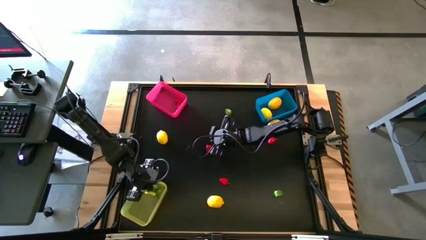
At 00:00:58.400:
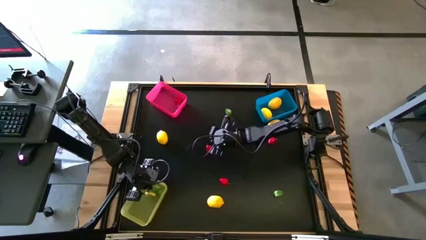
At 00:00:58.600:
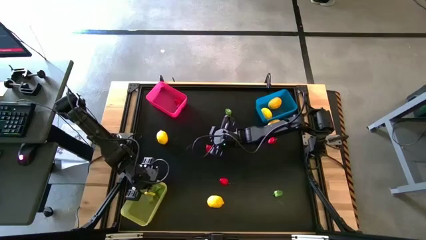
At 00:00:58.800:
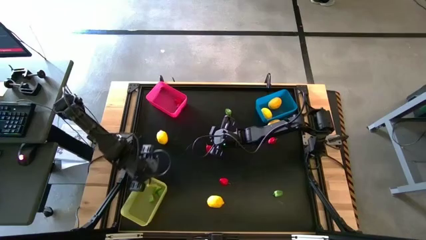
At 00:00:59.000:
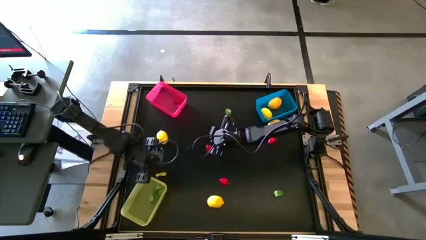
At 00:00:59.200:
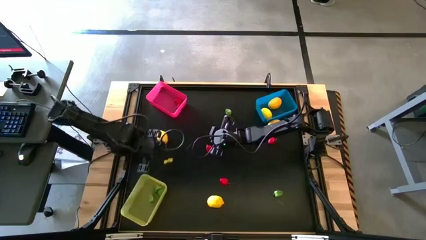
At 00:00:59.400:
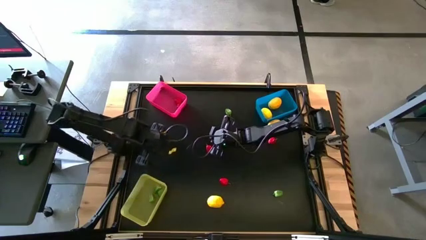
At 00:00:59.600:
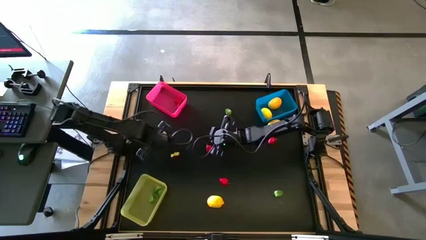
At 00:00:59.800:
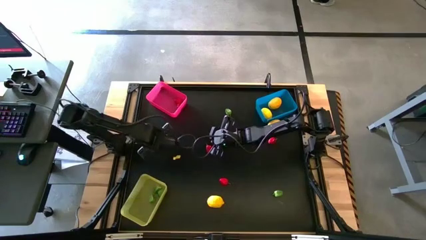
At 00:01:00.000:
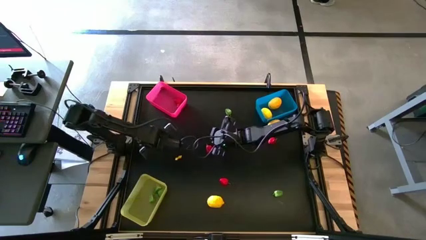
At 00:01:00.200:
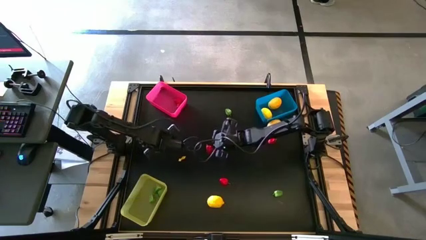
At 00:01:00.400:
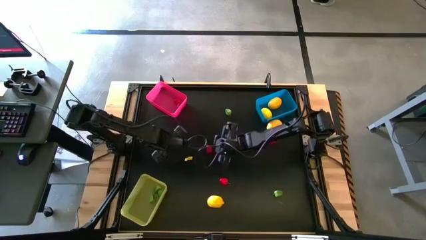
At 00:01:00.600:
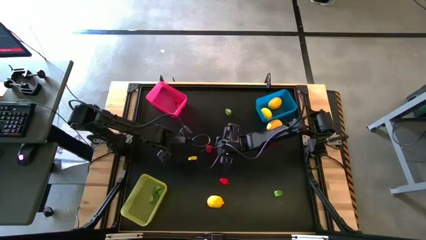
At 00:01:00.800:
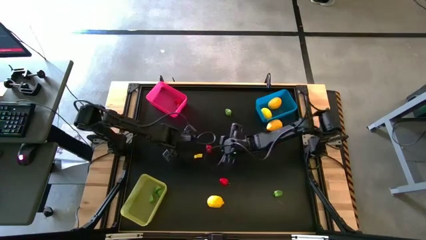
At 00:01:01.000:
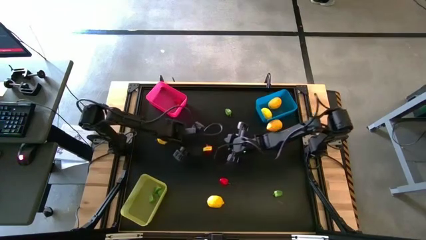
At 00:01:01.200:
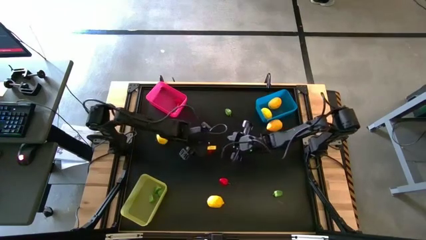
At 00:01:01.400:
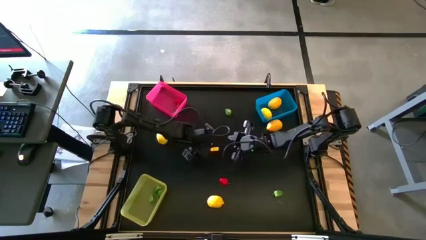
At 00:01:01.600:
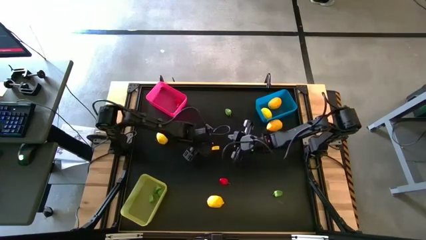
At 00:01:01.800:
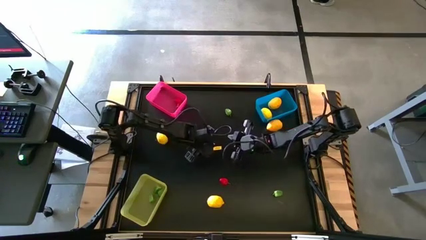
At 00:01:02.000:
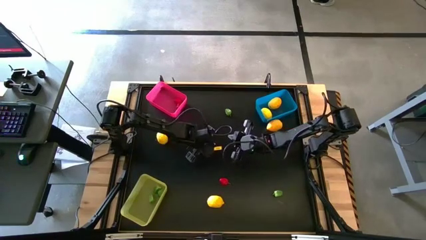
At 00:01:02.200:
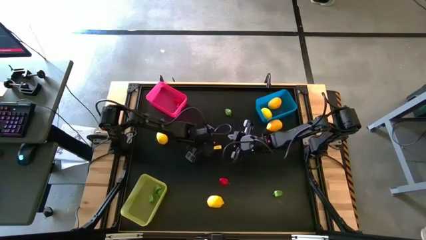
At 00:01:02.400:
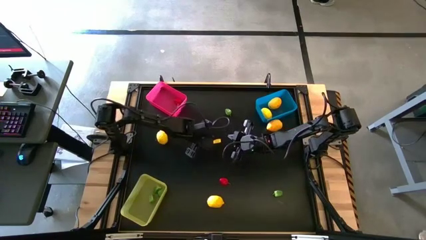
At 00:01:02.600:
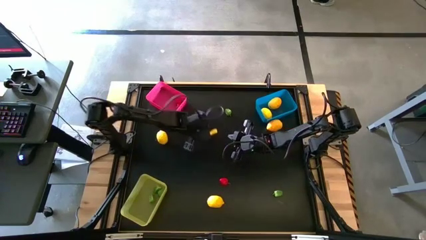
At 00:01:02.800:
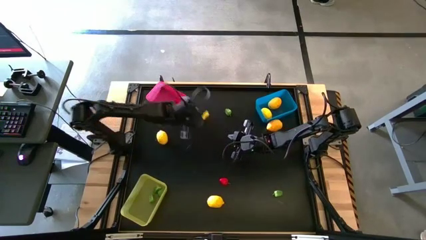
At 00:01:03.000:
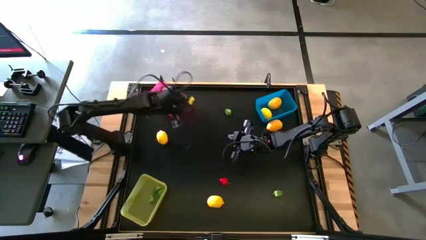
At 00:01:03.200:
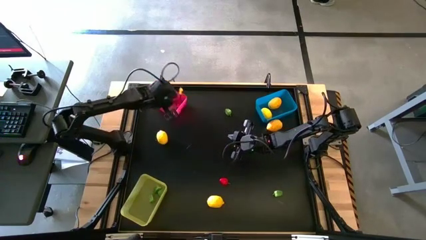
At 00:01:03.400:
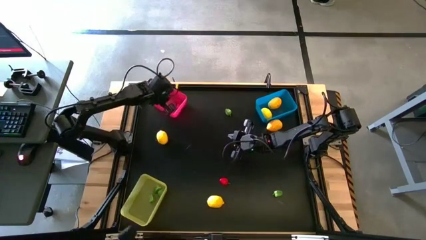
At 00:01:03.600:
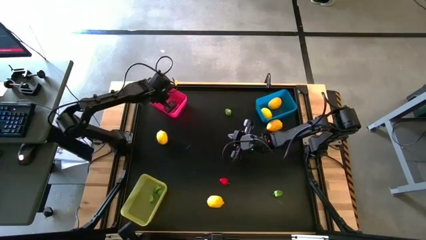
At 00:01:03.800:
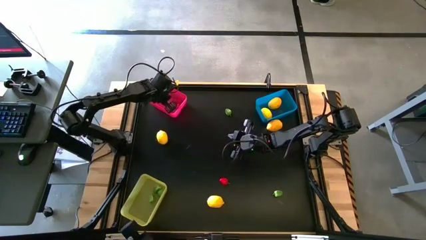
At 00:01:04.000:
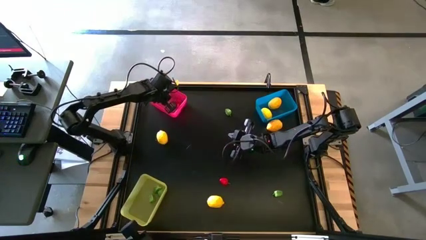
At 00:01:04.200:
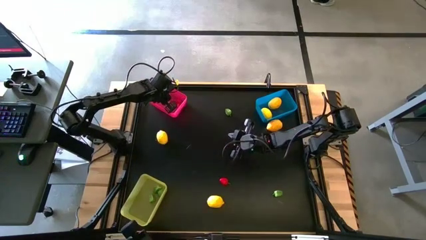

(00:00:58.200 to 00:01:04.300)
Task: Sort produce into baskets
Put the red bell pepper into the red bin

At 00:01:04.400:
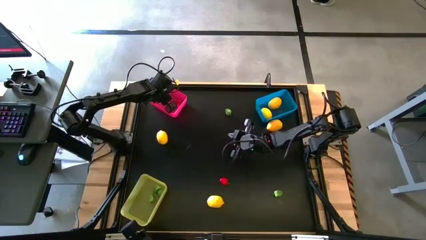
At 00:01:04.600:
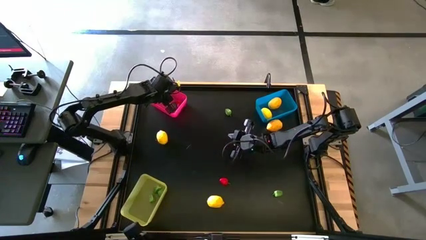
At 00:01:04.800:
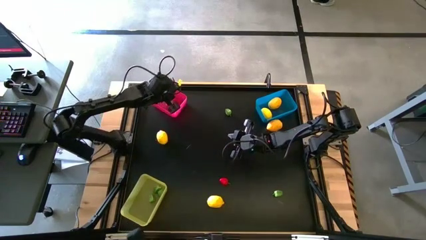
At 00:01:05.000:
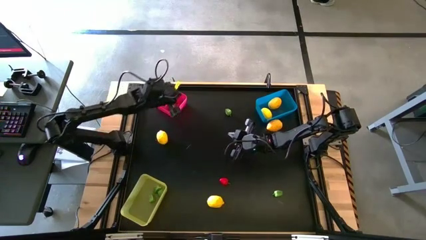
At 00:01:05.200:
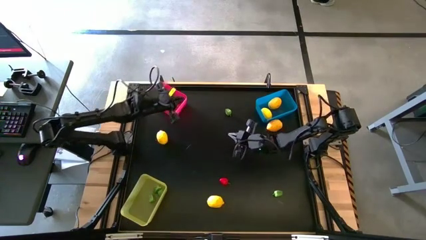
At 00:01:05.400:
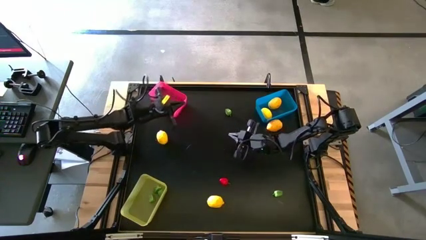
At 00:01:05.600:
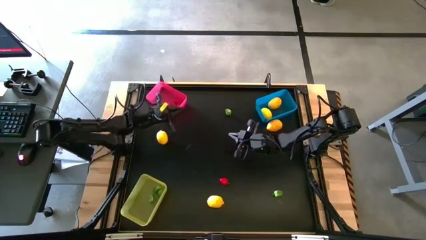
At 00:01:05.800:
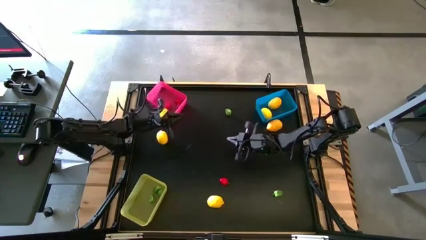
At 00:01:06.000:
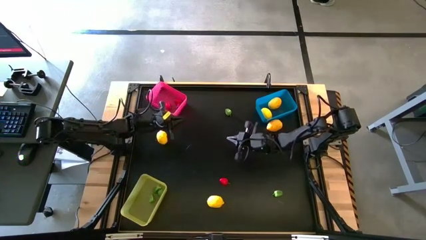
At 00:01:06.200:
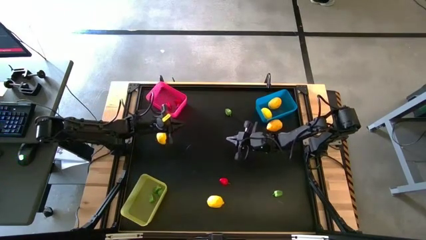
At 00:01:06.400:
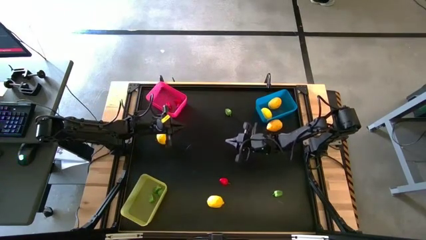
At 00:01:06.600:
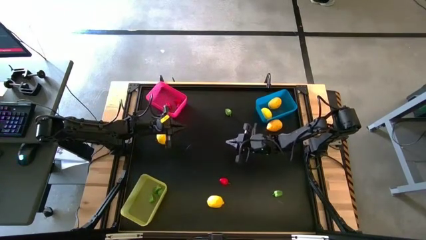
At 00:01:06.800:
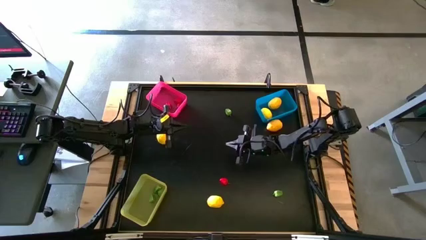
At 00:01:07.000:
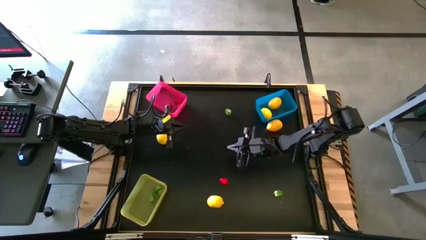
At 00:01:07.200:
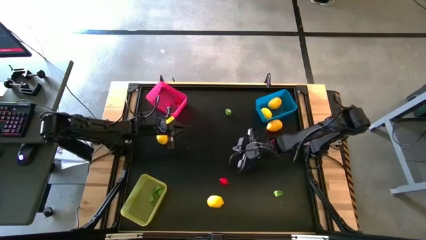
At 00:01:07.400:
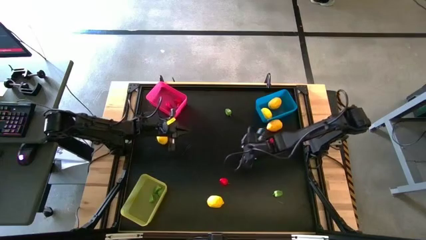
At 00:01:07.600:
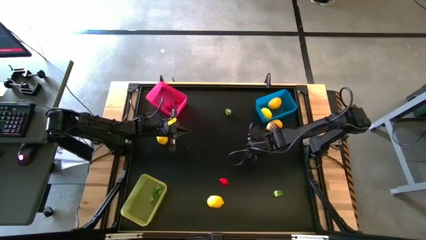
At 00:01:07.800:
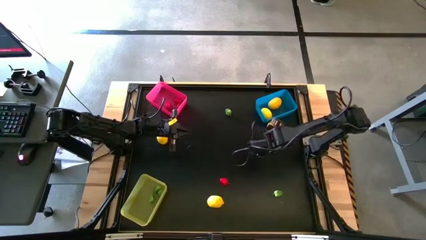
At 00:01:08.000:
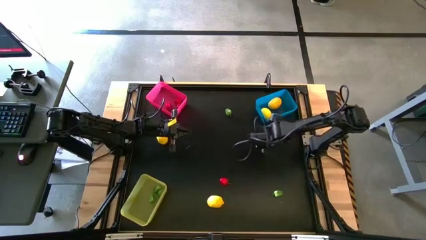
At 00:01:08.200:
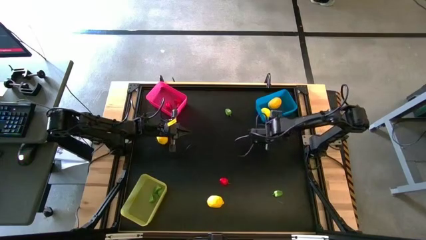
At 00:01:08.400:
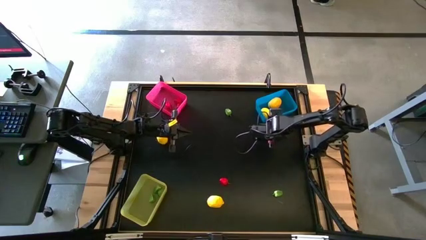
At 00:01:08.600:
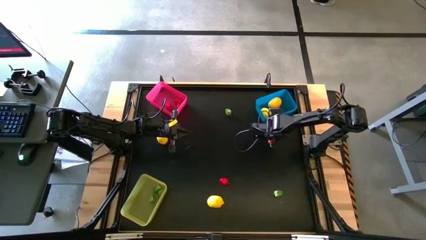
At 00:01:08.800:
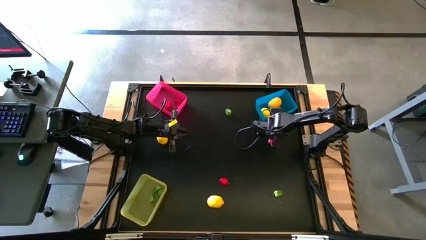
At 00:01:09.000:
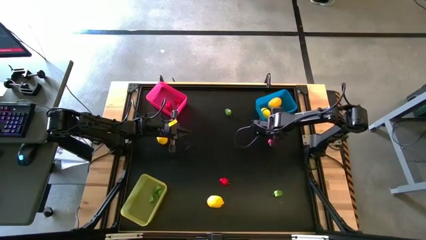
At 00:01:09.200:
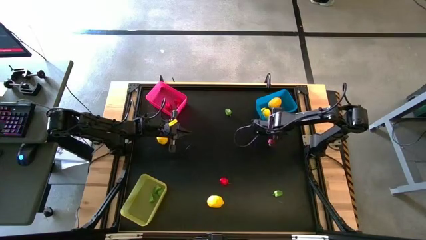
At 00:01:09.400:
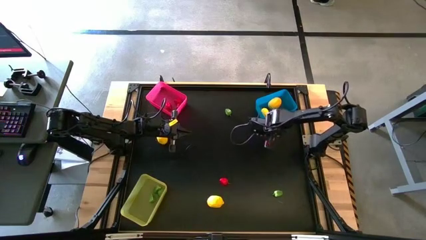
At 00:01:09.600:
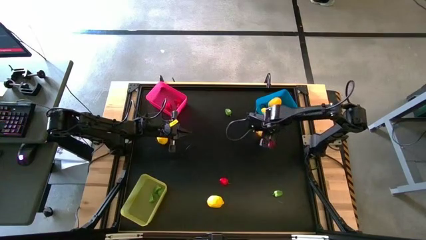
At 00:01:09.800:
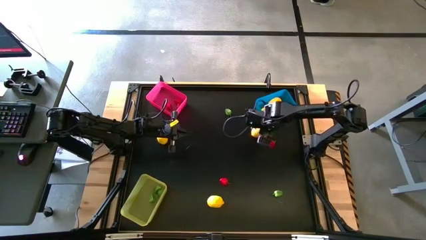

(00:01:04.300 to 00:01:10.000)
Put the yellow lemon into the blue bin

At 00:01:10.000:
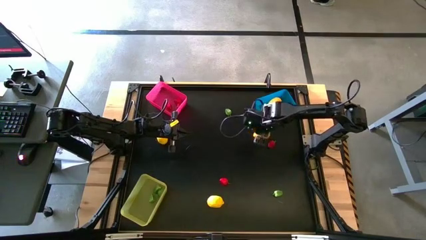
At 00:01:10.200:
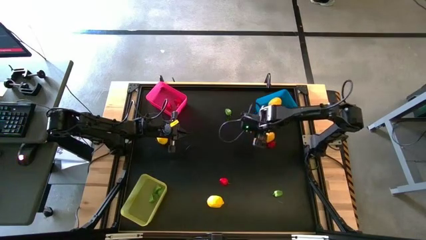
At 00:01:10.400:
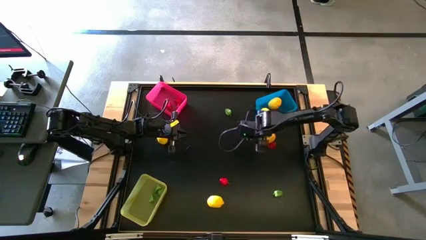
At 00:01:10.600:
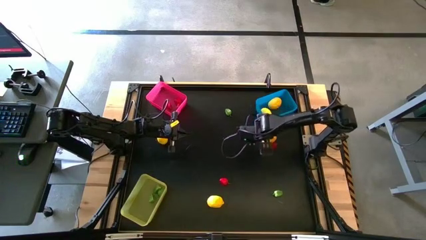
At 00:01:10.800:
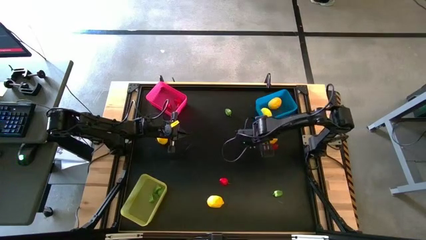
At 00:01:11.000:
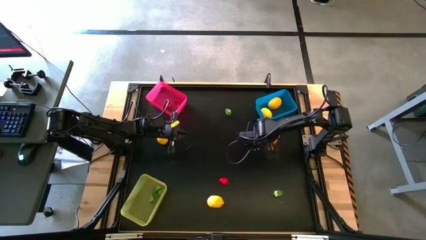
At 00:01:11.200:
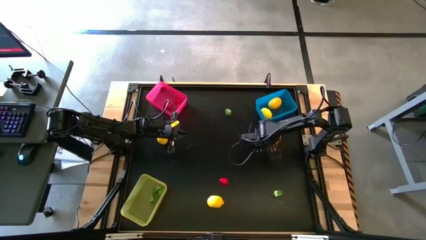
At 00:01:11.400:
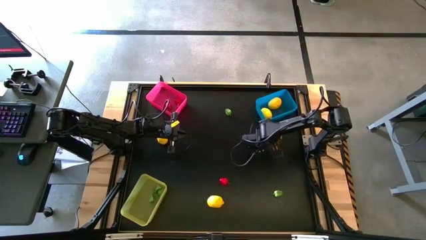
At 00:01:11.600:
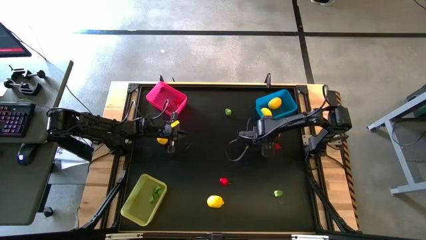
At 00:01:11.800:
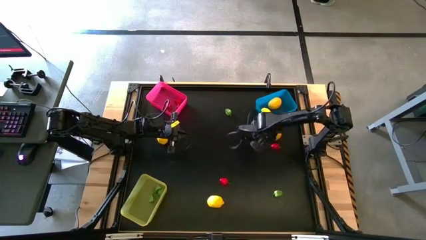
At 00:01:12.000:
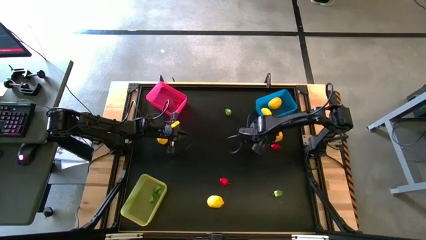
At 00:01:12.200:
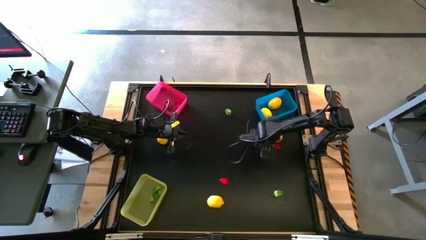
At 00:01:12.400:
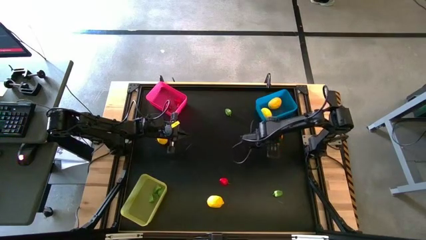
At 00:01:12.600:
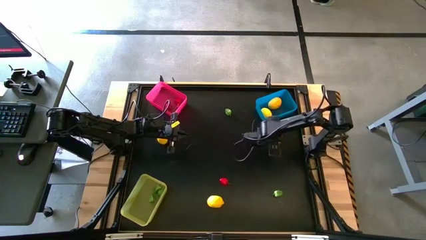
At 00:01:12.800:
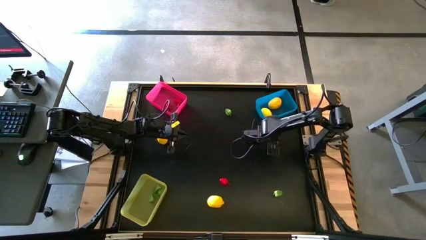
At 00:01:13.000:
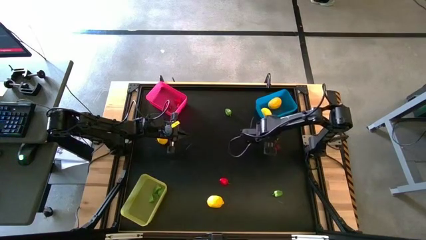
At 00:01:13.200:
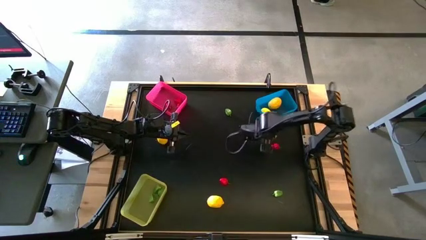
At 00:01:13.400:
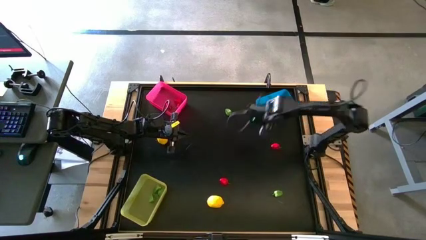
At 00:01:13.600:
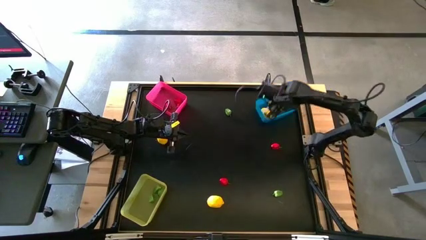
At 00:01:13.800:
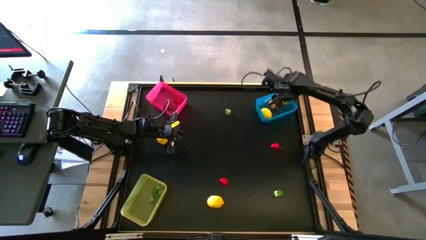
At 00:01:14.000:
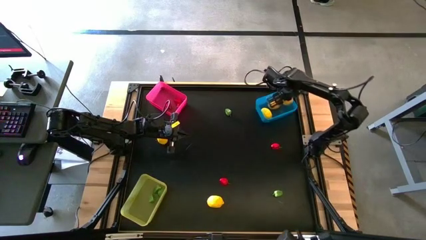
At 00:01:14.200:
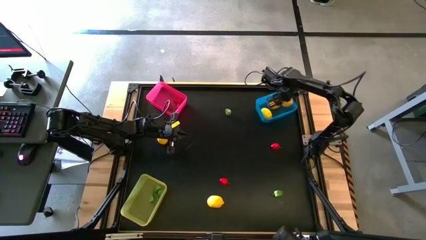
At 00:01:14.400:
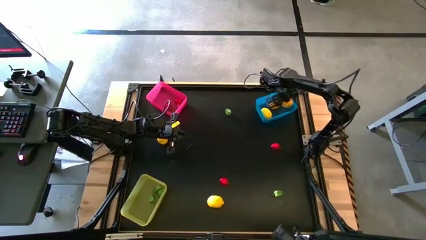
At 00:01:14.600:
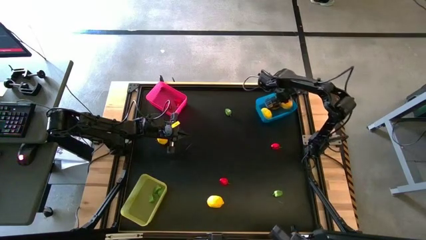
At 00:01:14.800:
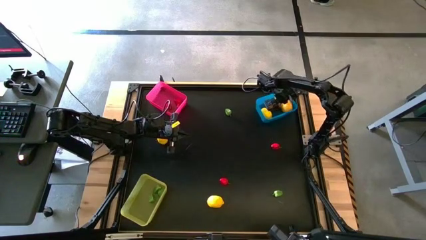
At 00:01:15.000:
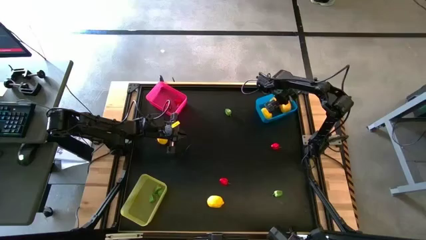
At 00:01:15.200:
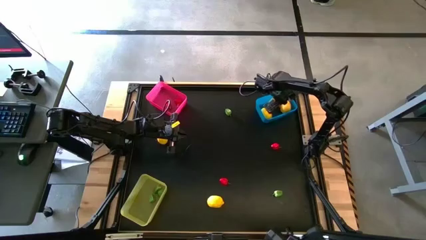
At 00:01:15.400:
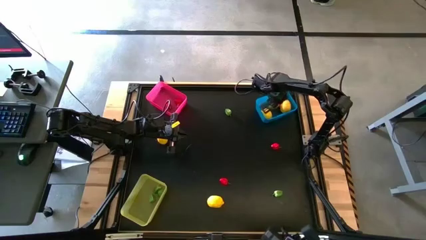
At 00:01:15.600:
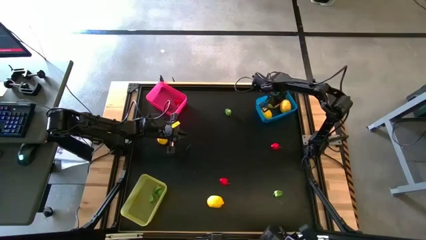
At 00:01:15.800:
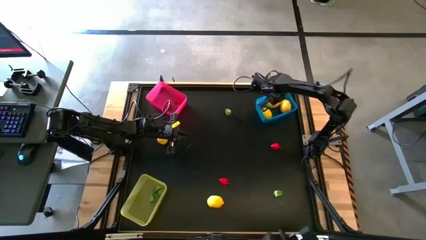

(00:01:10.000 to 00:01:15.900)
Put the yellow lemon into the blue bin
